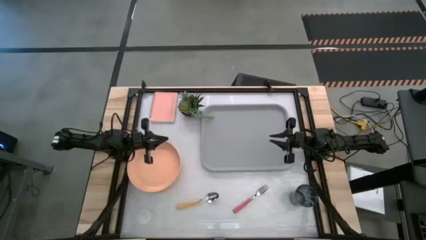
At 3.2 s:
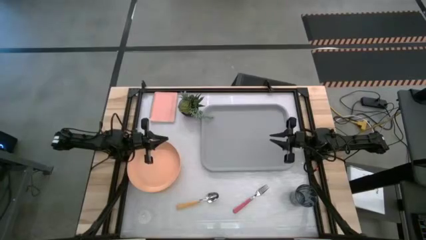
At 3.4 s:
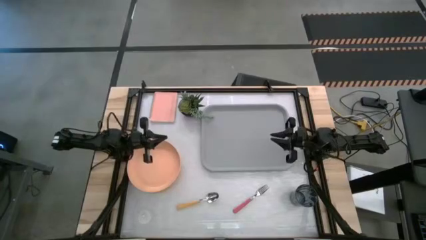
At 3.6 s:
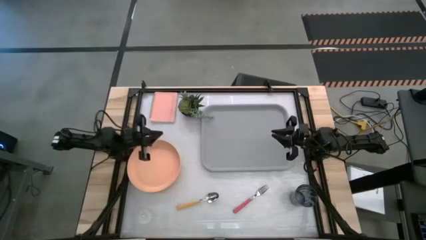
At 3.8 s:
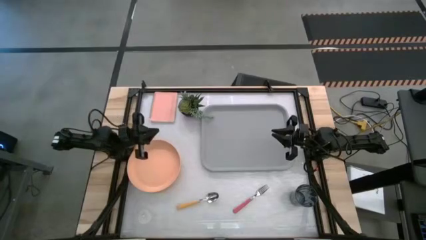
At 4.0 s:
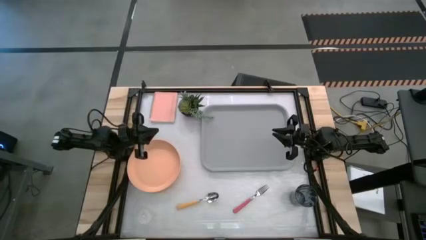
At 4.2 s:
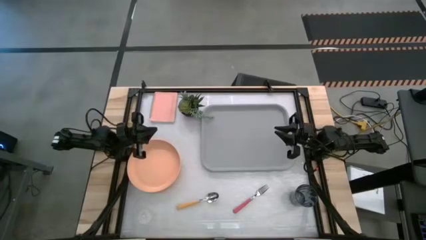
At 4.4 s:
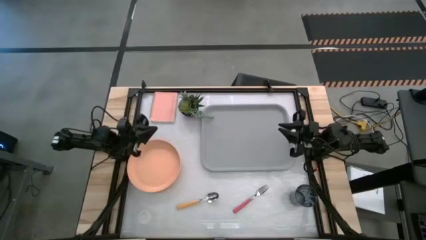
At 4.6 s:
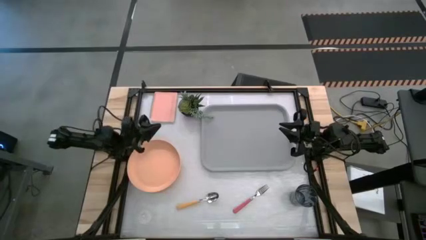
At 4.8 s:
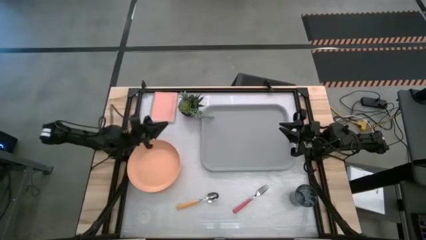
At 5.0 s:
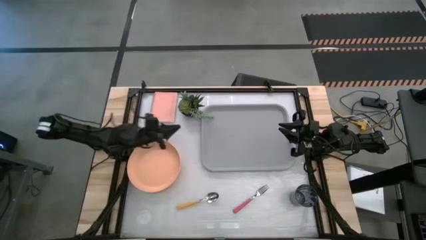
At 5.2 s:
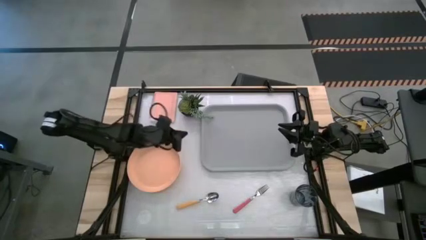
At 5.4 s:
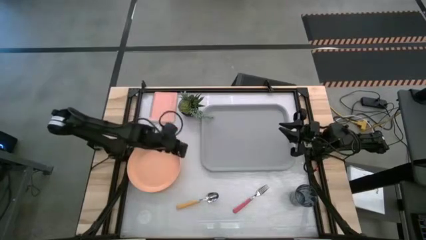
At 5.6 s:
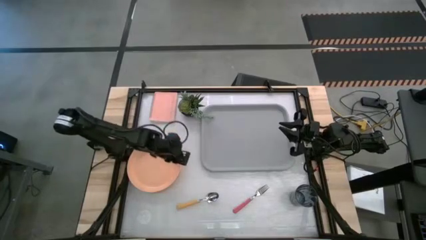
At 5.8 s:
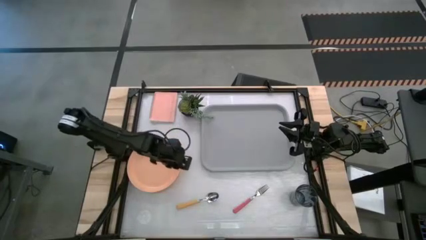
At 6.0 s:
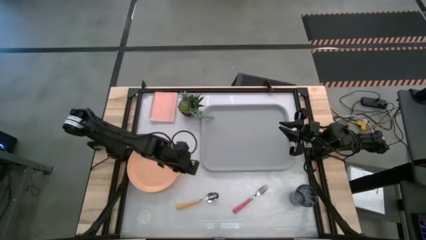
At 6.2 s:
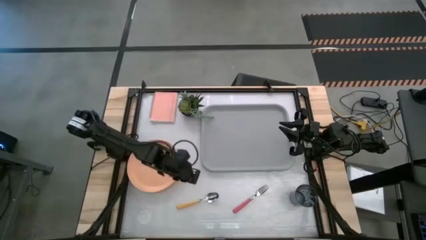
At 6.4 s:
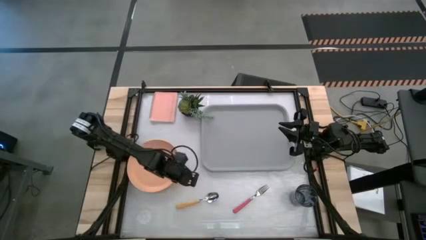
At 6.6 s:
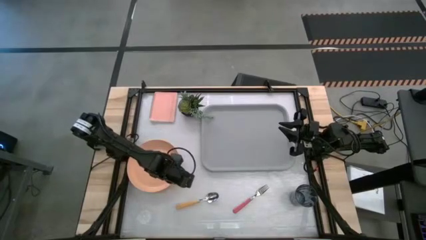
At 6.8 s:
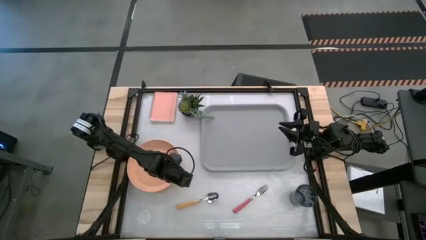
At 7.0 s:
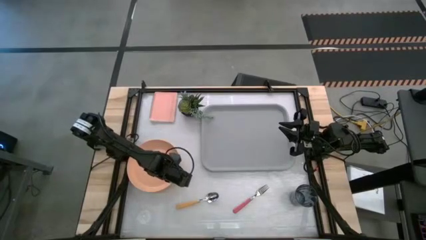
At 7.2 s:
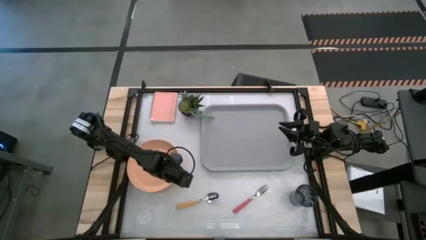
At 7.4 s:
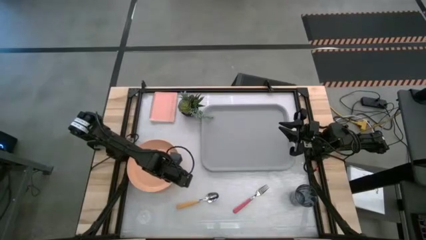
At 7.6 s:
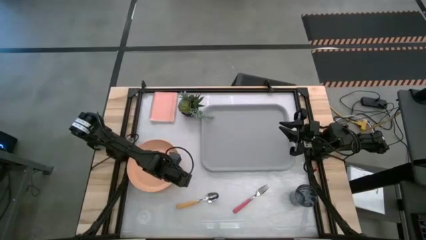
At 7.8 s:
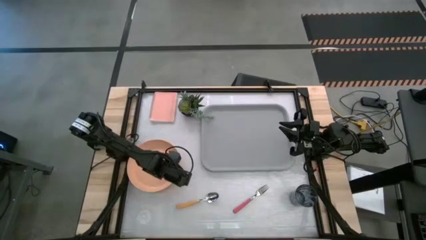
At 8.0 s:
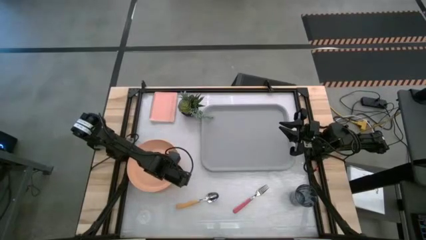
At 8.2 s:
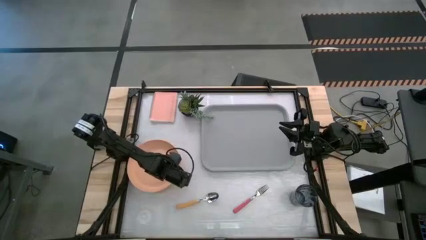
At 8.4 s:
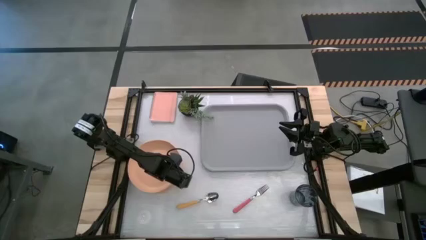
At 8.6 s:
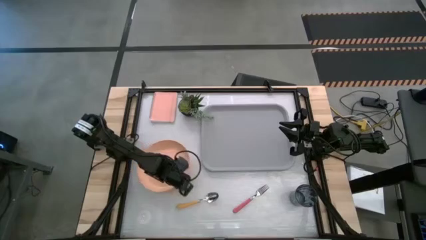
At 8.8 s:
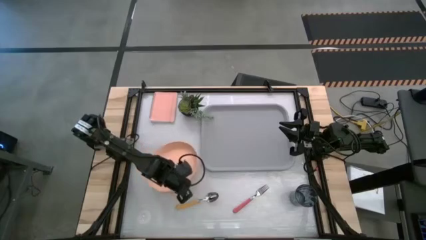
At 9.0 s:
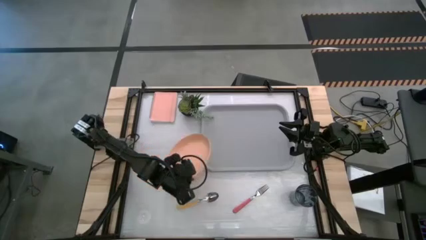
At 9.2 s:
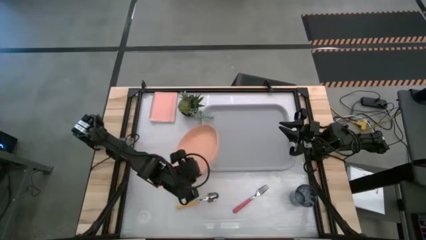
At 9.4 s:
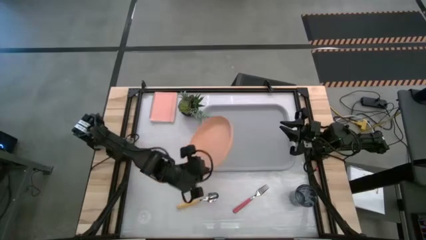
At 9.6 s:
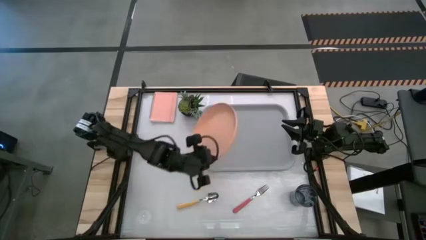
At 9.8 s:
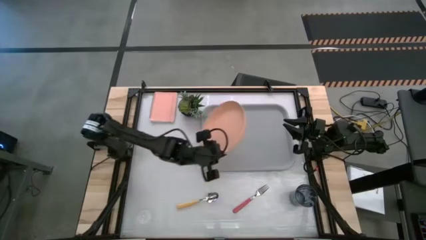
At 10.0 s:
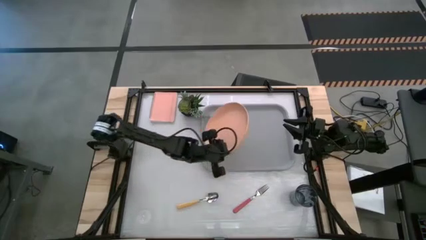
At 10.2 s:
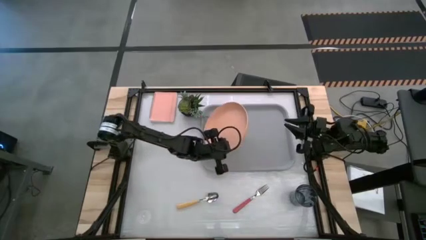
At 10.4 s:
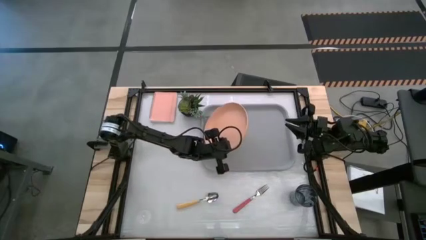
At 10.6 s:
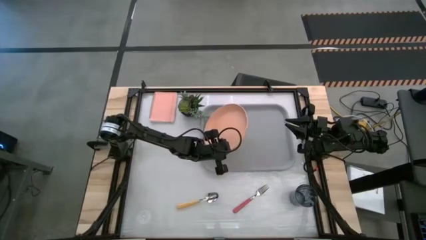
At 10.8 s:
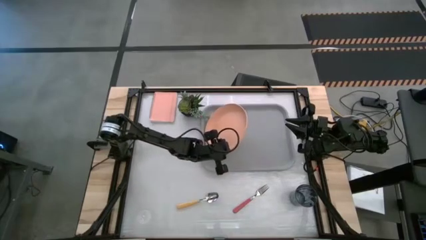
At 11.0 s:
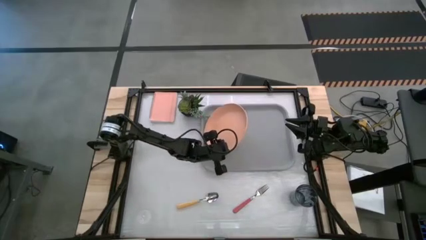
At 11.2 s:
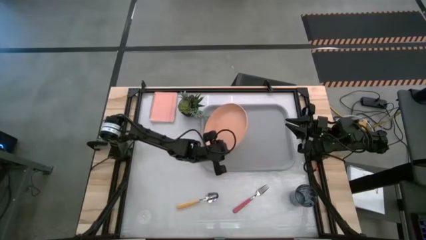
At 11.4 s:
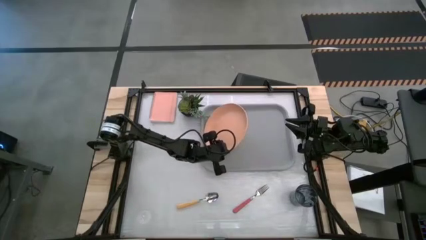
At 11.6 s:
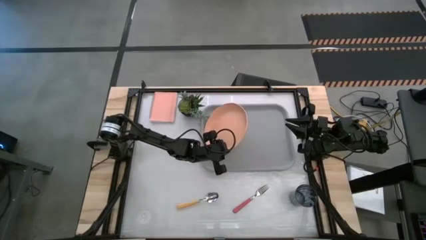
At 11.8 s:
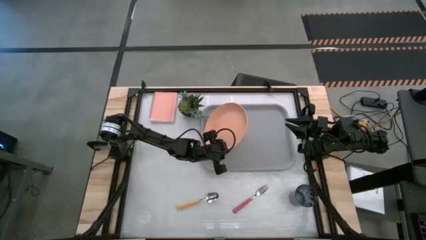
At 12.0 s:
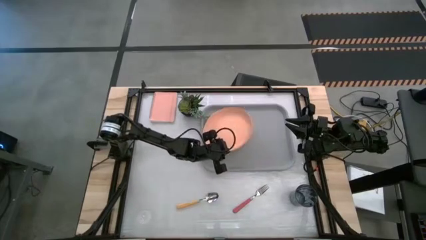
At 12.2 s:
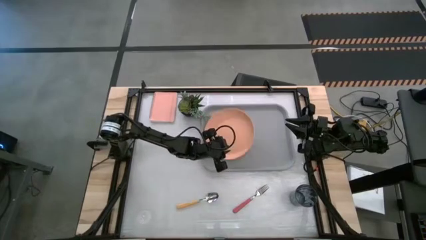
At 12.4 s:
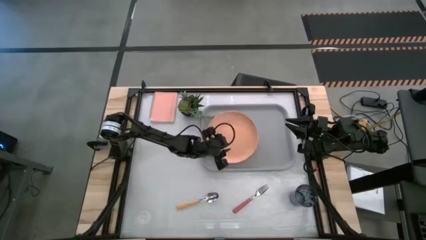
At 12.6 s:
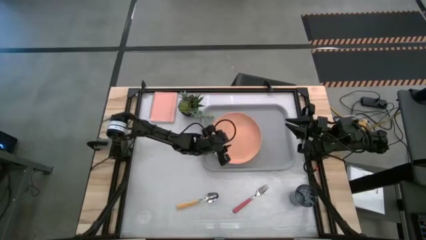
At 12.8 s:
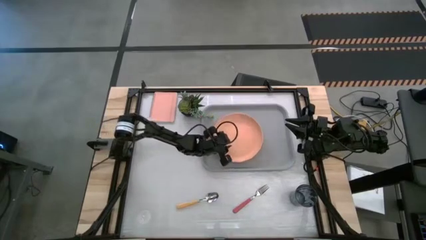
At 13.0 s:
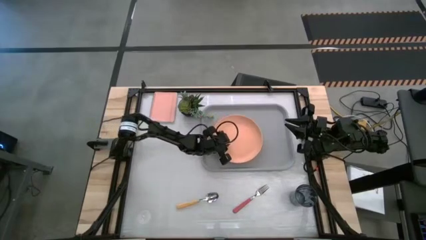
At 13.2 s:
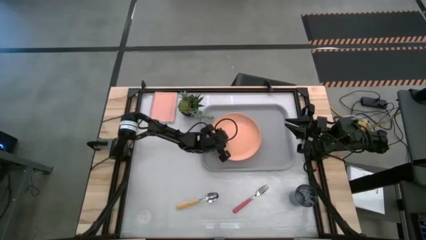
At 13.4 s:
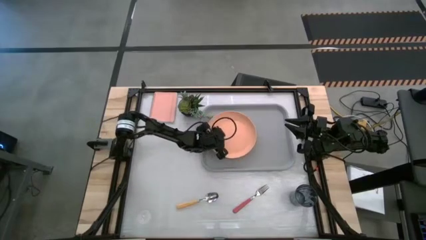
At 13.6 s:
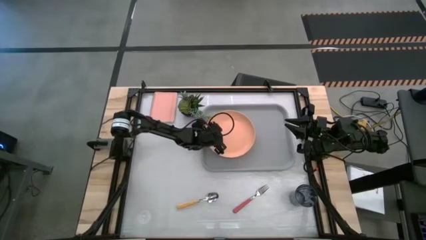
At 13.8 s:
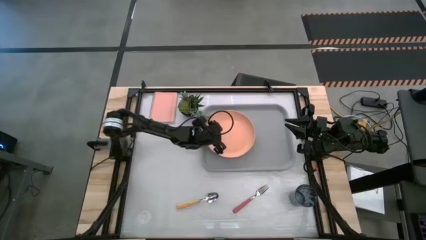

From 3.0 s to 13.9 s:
Task: Pick and place plate/cup/fork/spoon on tray
Put the plate on the gray tray

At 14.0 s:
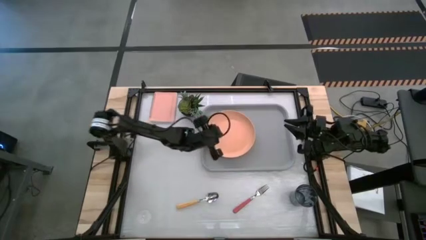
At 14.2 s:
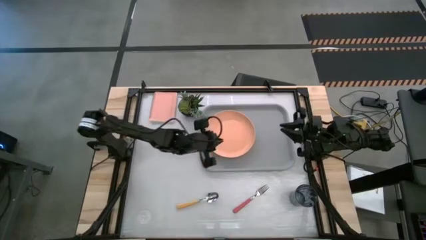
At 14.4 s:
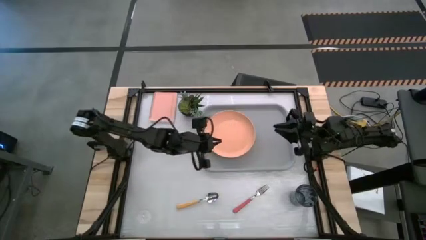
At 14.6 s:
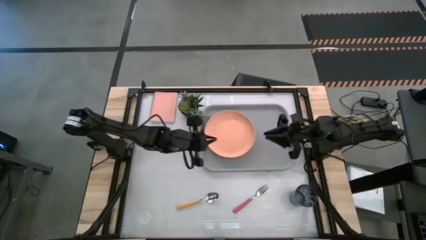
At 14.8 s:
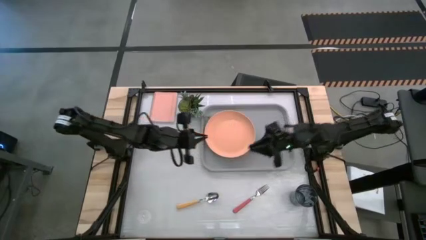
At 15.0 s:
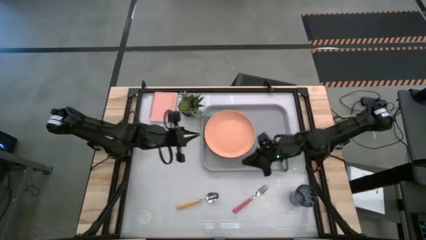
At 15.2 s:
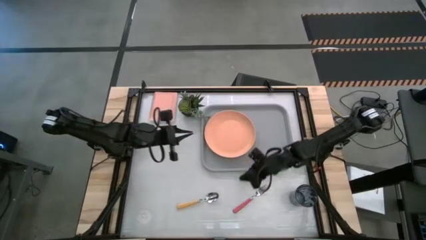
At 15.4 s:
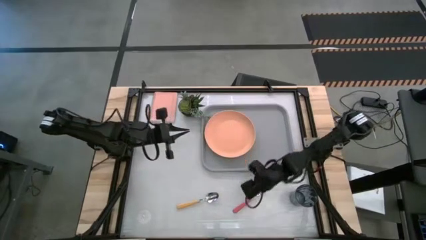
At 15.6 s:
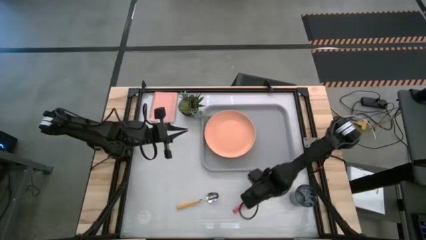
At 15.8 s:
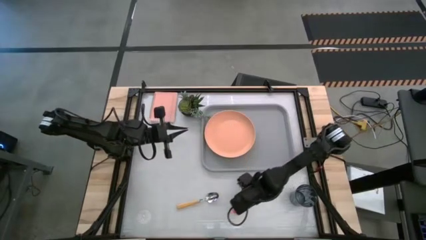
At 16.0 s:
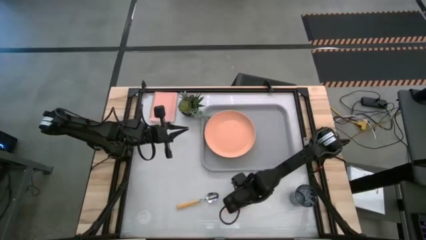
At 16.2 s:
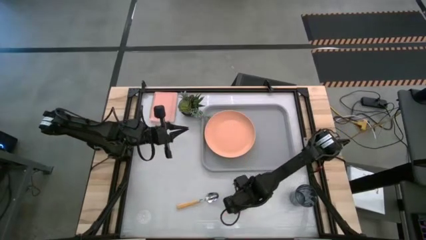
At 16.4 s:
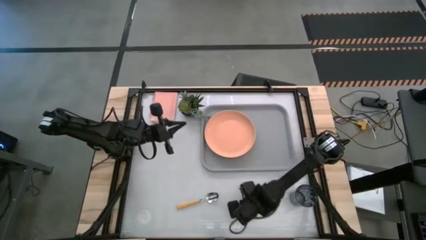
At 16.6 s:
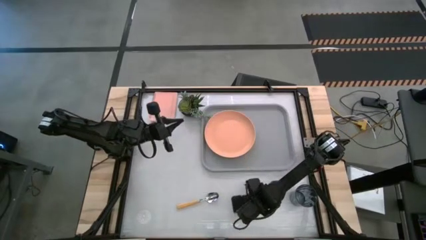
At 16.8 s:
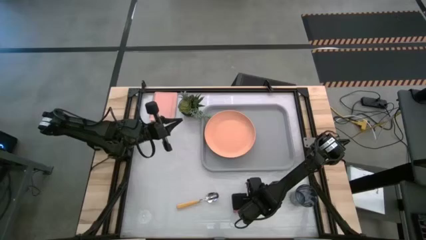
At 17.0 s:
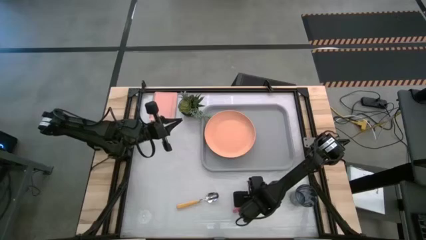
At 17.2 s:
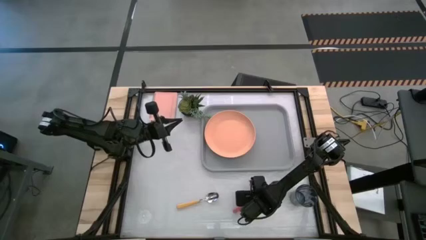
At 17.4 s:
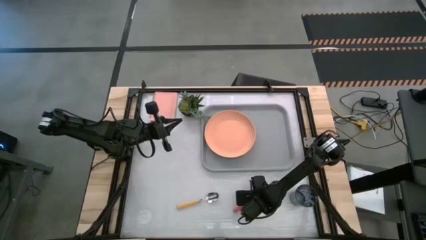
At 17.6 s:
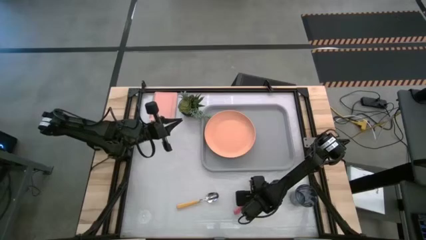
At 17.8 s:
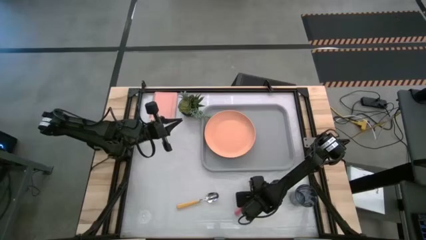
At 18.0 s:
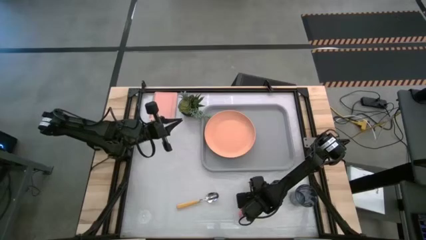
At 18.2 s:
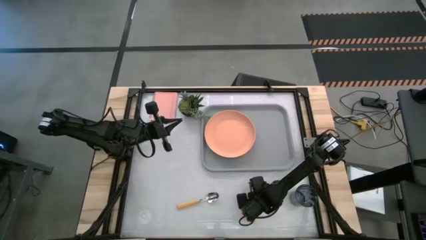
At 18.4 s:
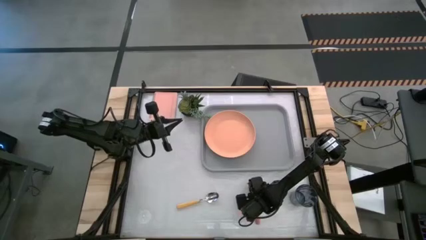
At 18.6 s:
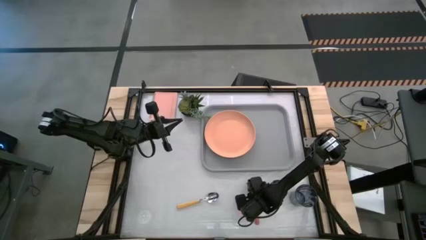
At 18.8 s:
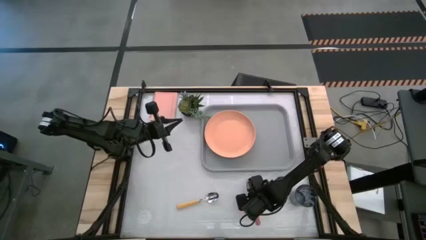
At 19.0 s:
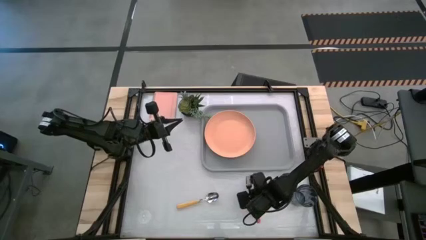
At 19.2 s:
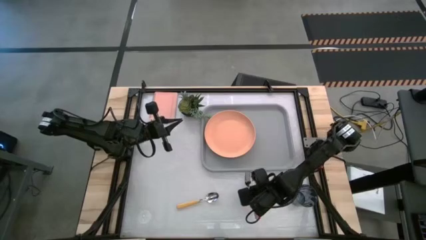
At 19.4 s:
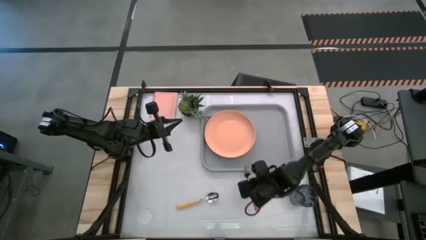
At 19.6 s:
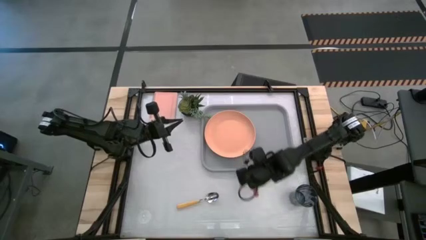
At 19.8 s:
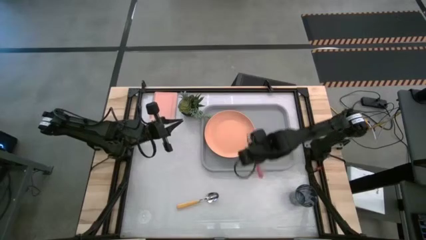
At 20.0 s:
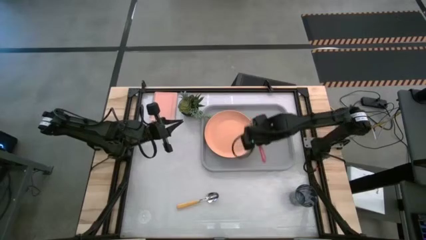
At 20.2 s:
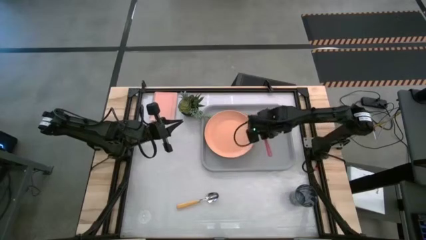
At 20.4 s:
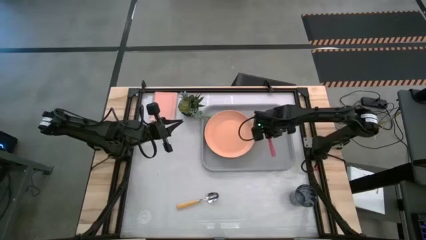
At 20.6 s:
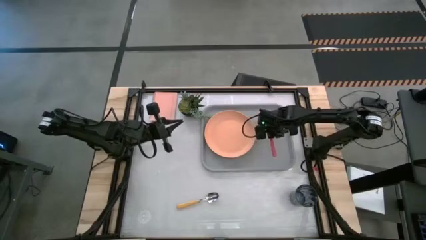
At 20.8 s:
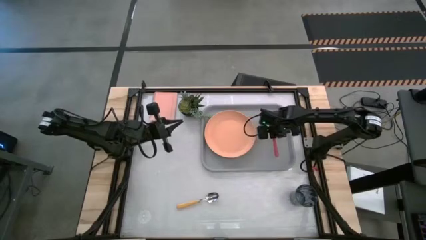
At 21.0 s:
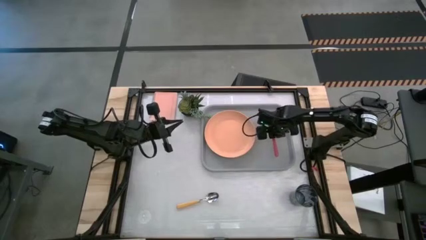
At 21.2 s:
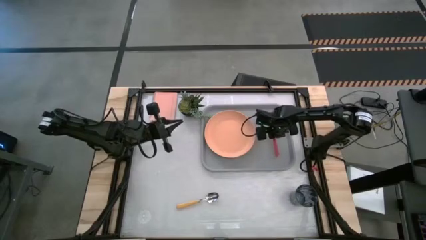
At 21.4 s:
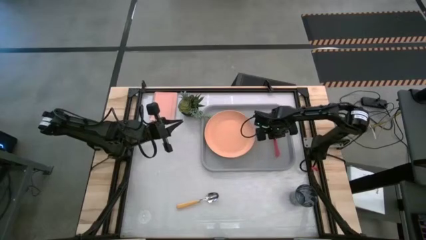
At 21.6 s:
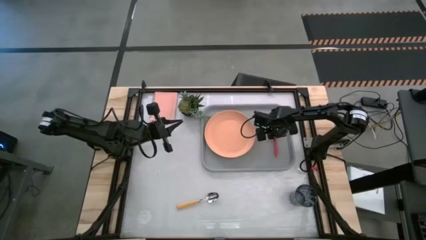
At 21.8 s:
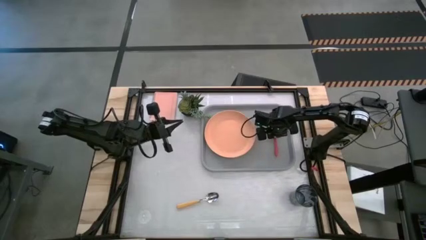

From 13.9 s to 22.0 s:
Put the light orange fork on the gray tray
